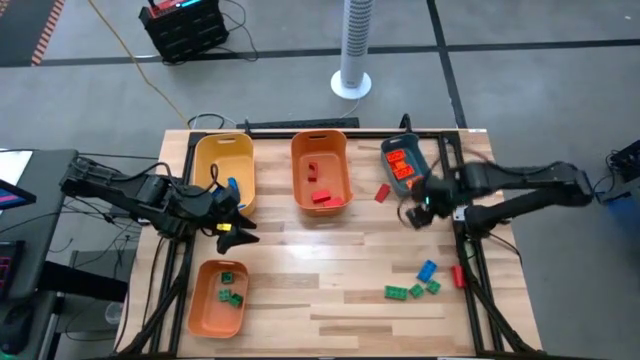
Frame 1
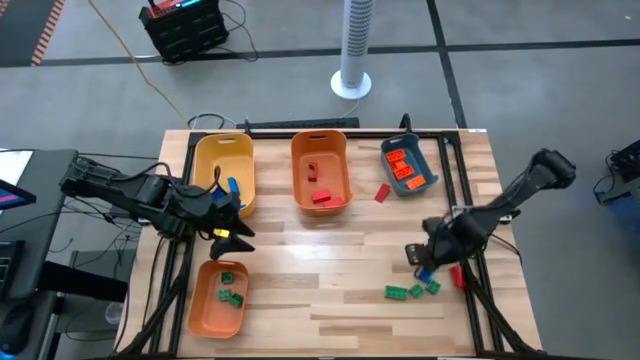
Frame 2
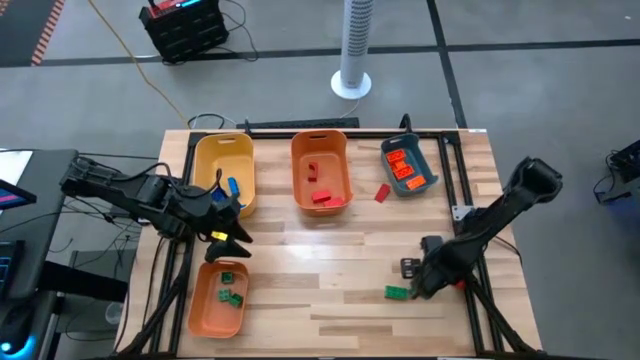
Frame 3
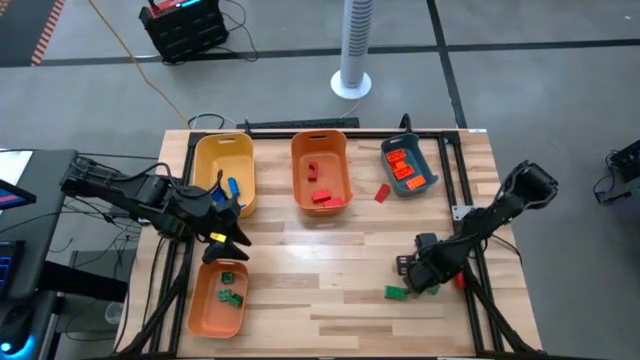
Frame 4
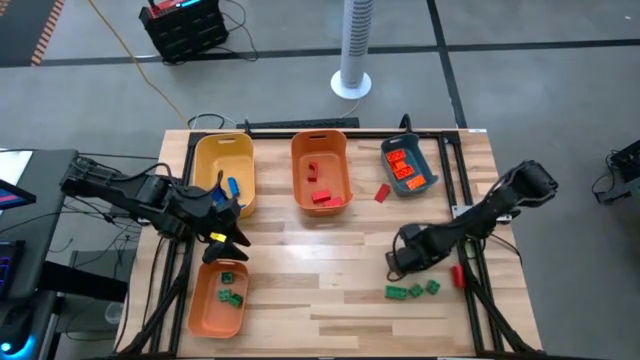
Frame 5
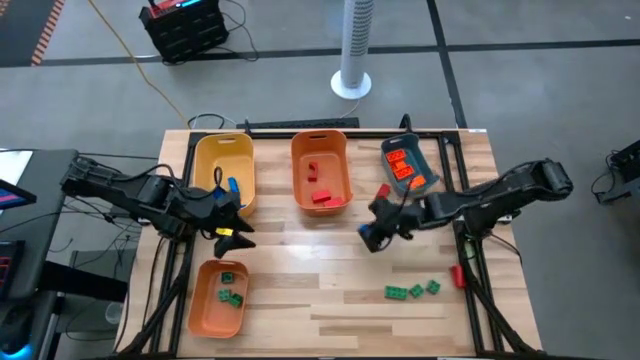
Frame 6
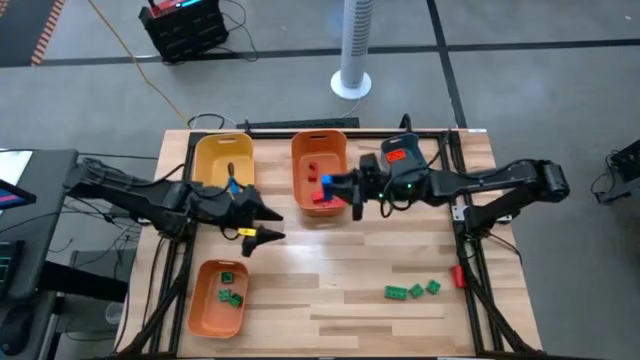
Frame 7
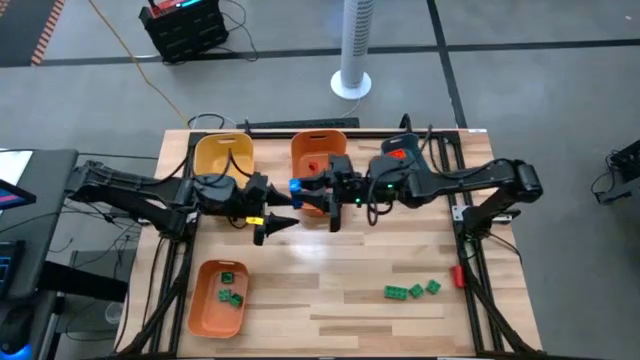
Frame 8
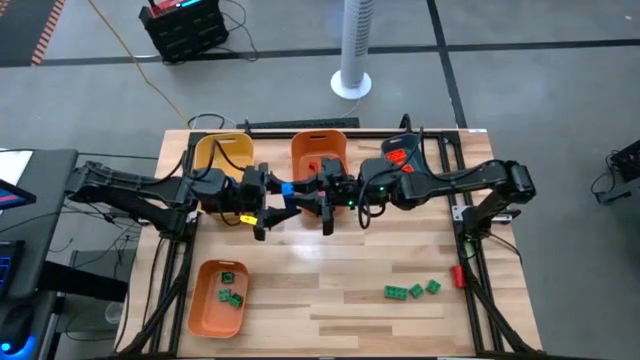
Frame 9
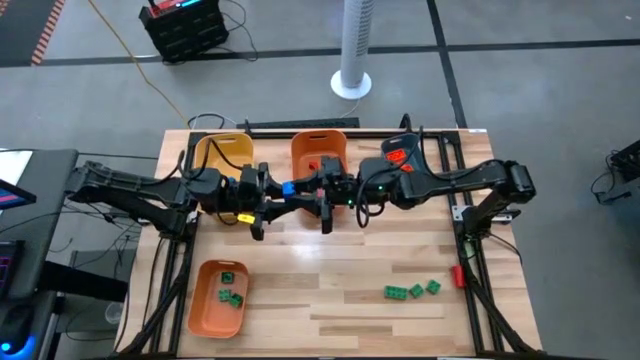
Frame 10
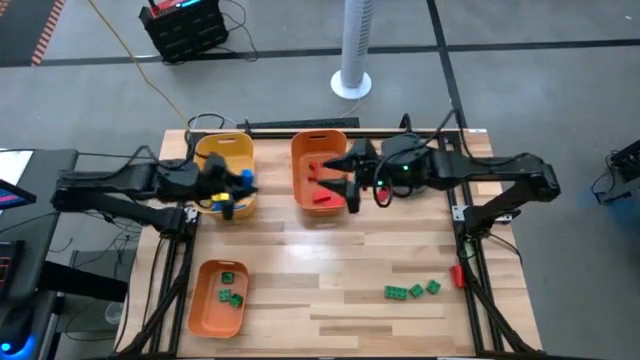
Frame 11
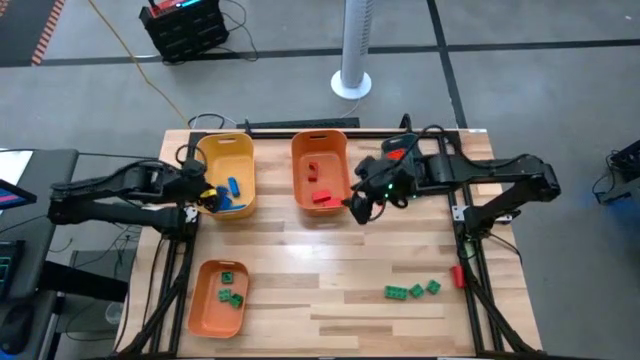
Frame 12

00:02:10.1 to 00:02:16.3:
Task: Sort blocks
Put the blue game piece into the yellow bin

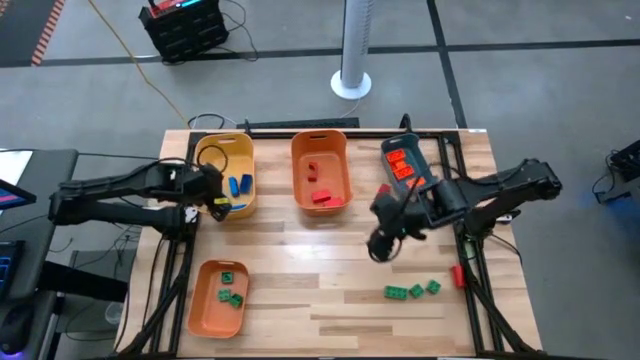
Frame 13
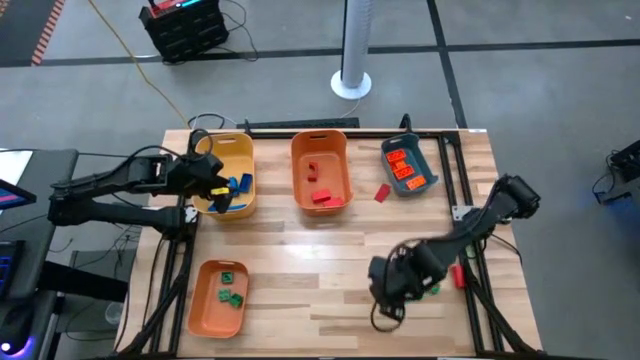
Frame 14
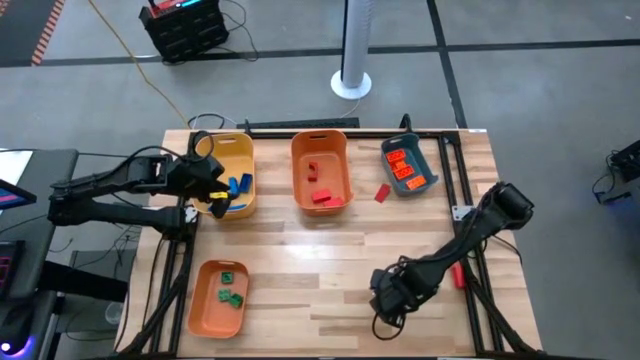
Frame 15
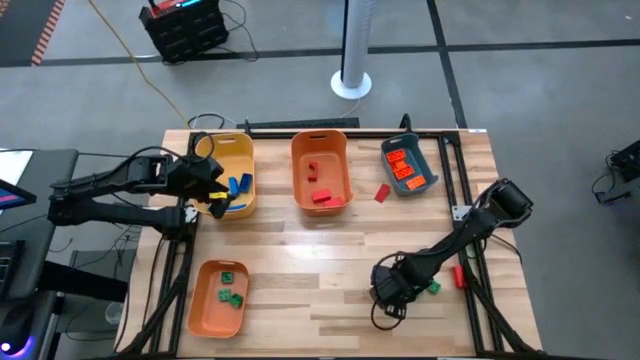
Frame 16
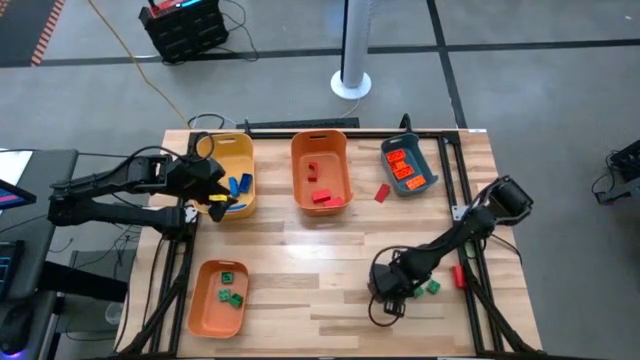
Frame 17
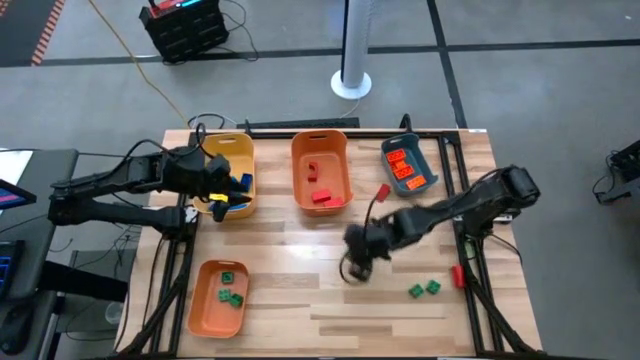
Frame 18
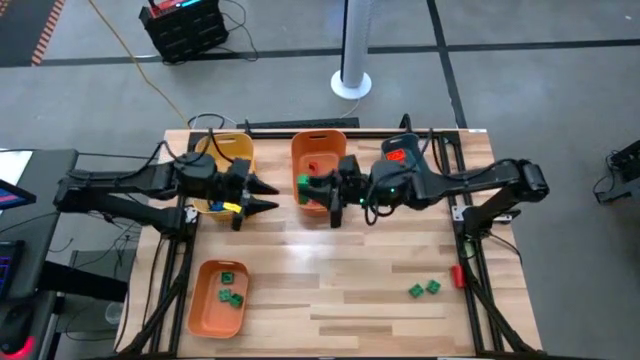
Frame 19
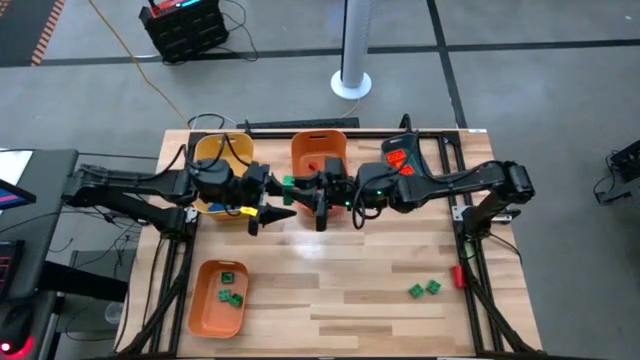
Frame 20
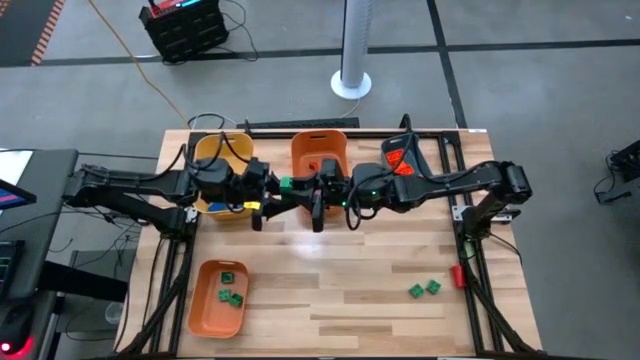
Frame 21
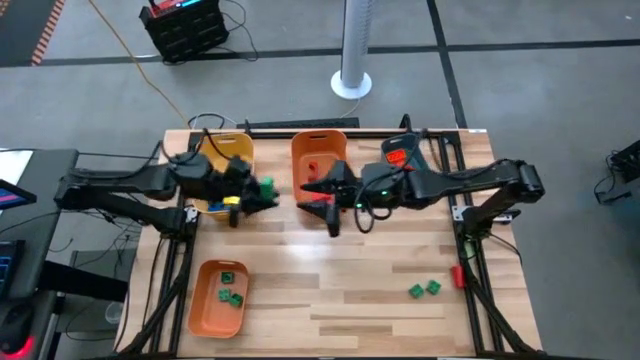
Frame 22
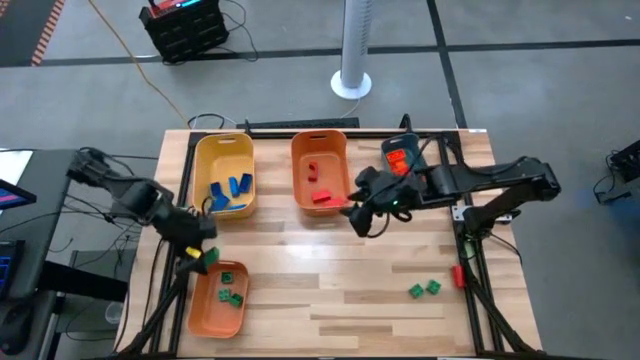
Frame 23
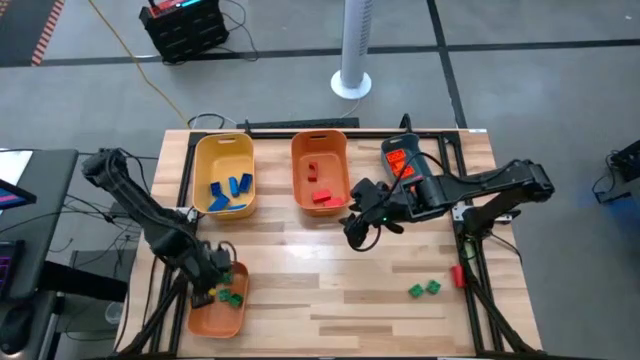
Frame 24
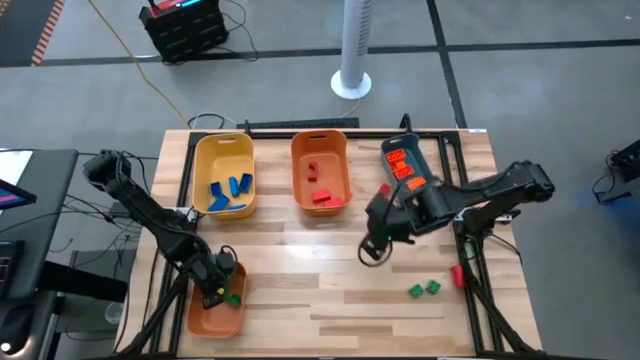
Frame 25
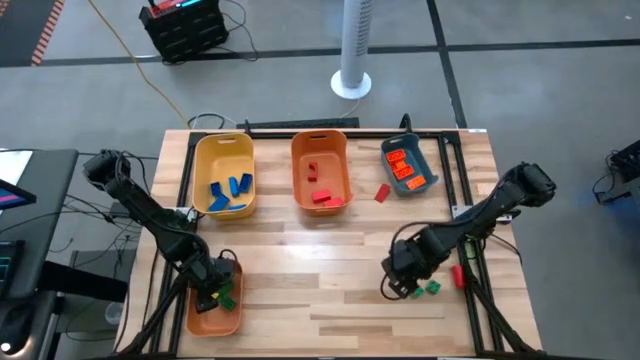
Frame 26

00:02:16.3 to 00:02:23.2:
Put the green game piece into the bottom orange bin

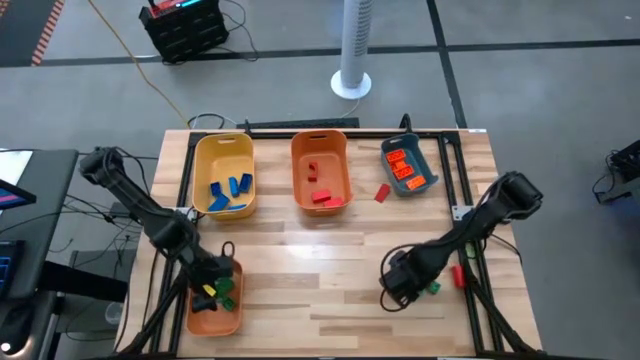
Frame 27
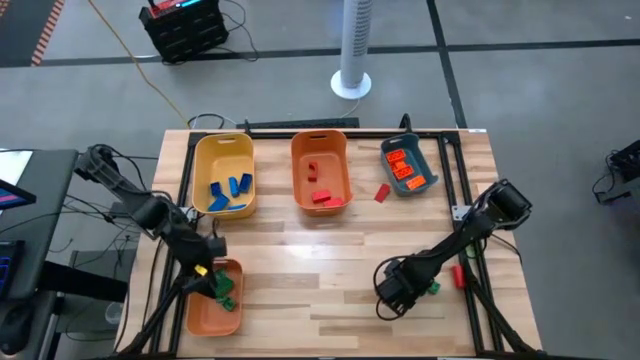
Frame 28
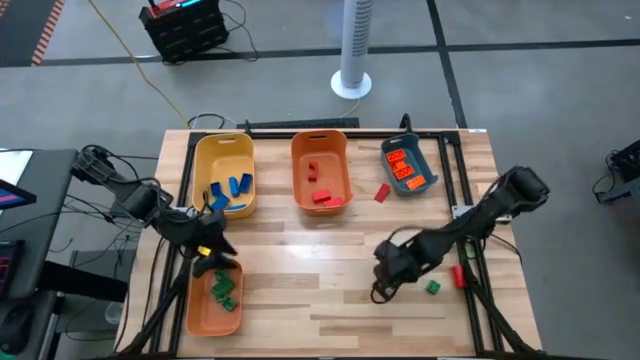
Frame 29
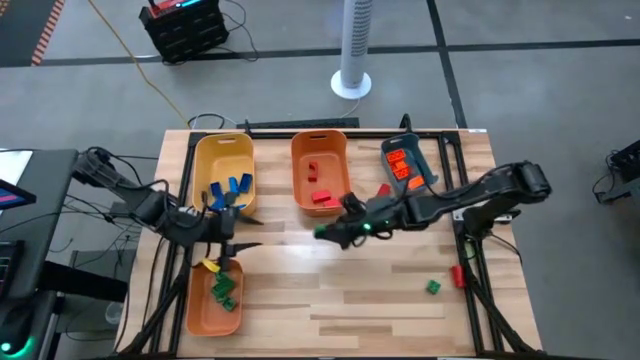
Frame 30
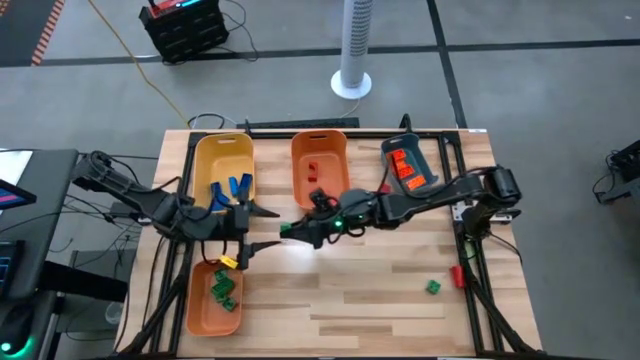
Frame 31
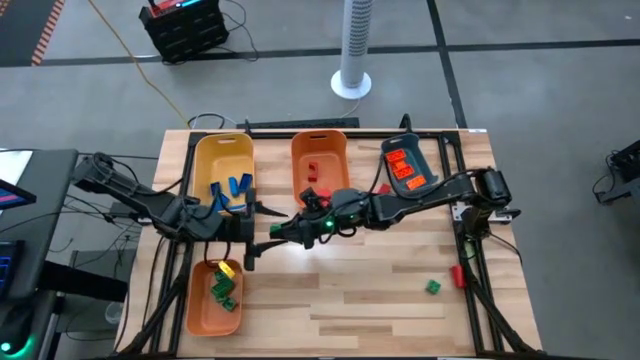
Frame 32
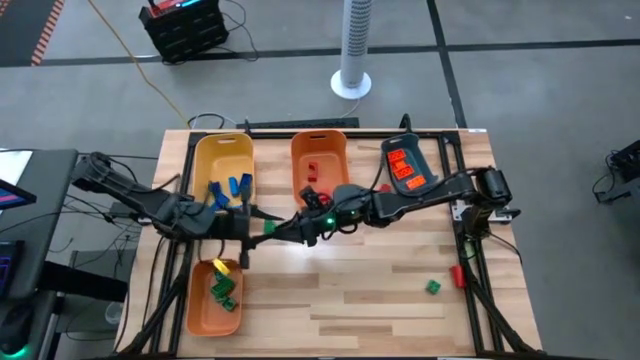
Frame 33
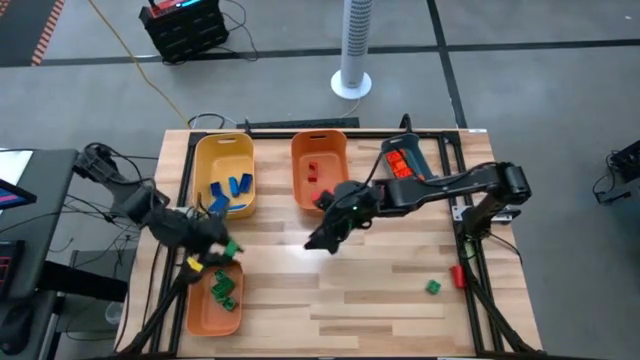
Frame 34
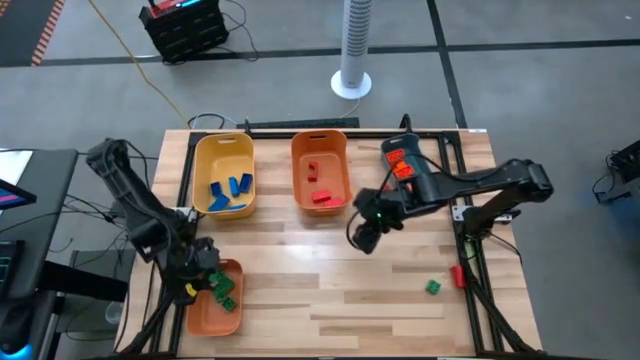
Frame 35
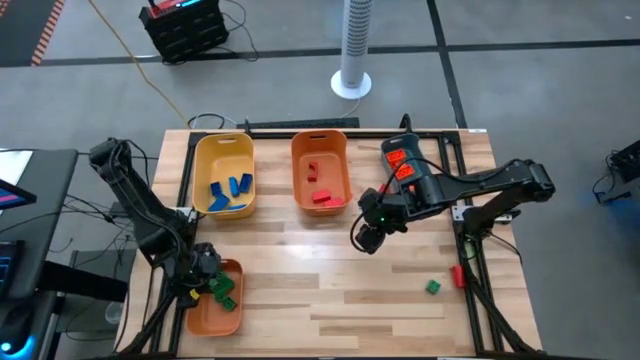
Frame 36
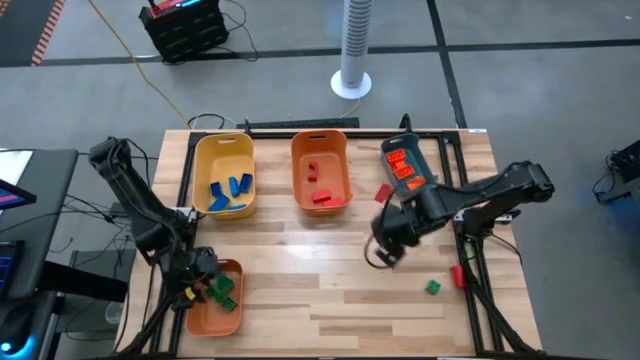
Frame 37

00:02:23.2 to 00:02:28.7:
Put the green game piece into the bottom orange bin

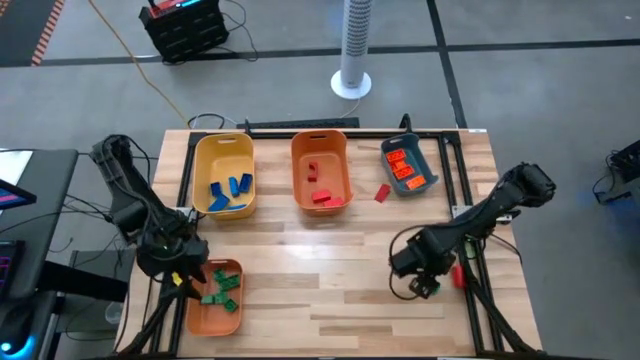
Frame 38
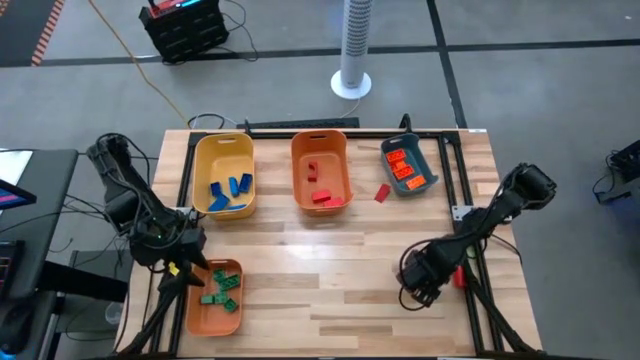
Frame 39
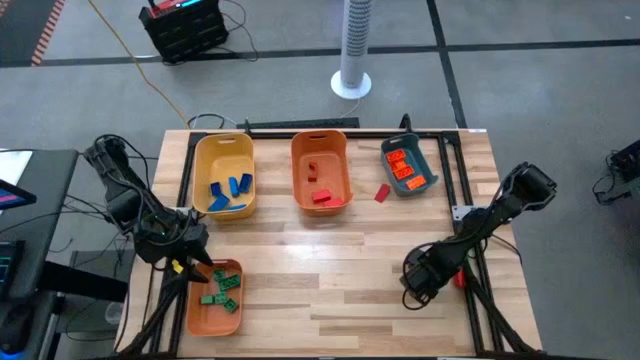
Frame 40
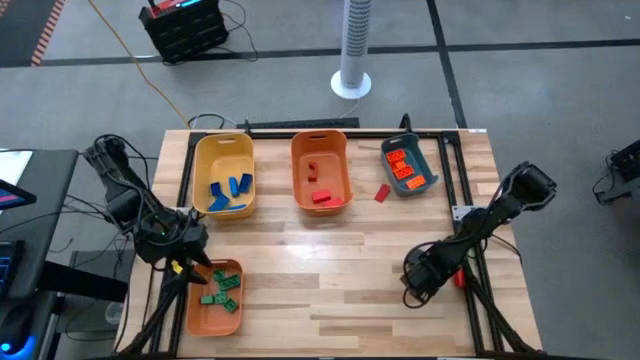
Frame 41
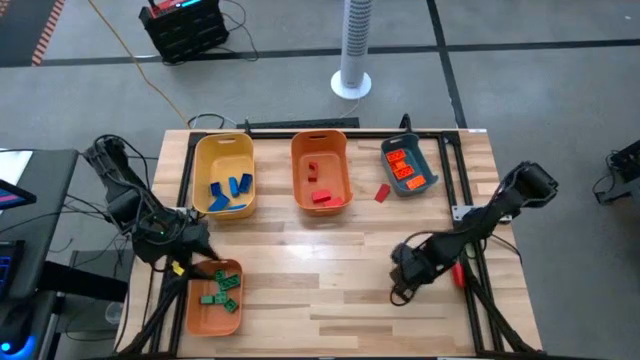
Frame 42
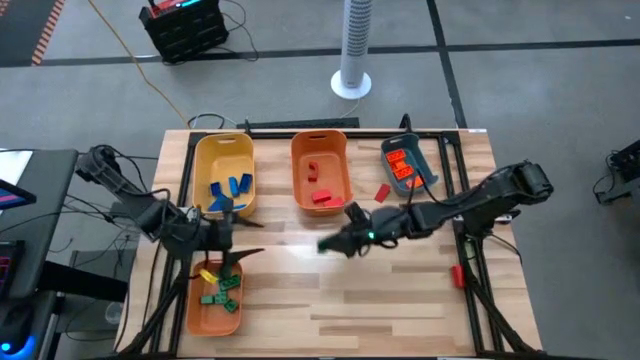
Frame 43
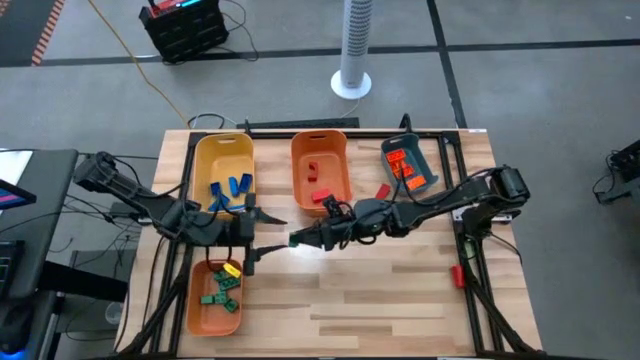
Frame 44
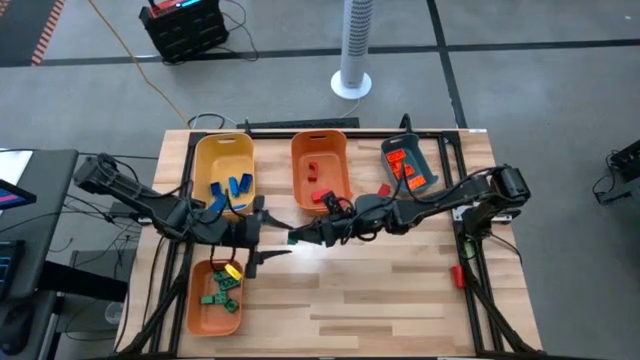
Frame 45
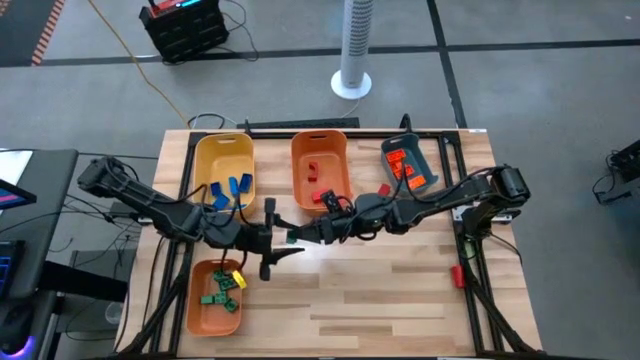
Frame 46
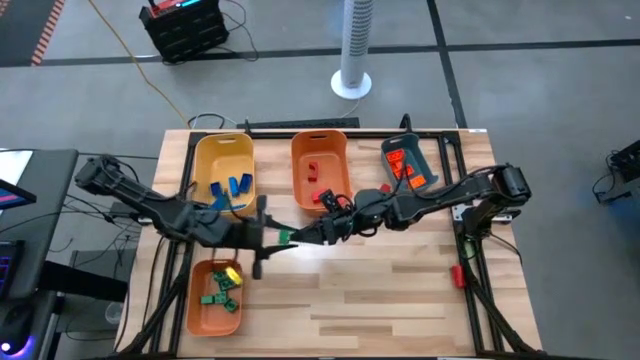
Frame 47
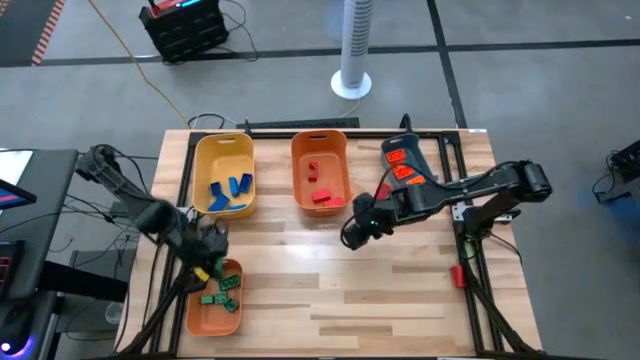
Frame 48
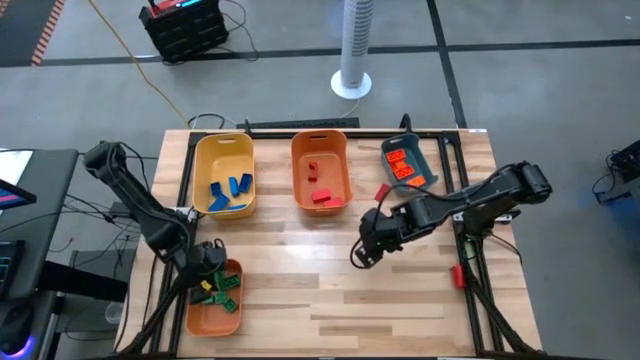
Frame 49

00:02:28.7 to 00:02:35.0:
Put the green game piece into the bottom orange bin
